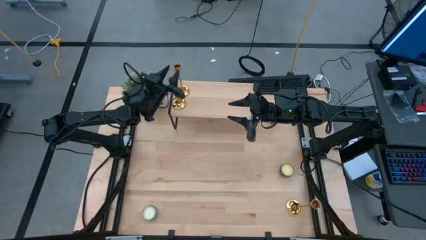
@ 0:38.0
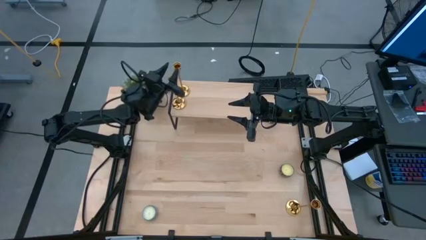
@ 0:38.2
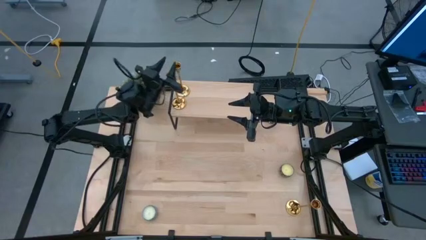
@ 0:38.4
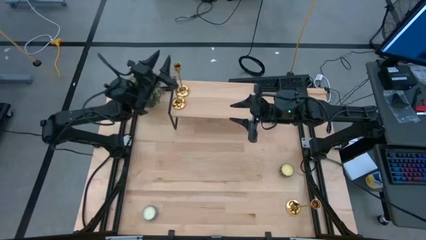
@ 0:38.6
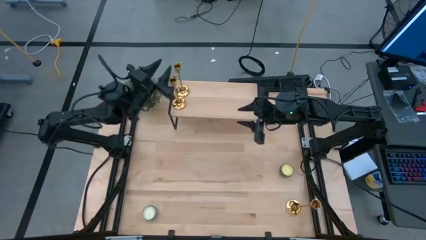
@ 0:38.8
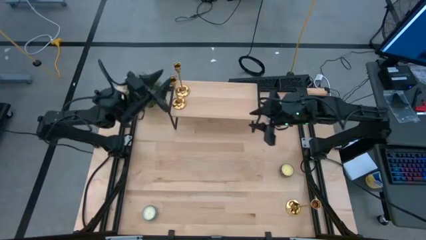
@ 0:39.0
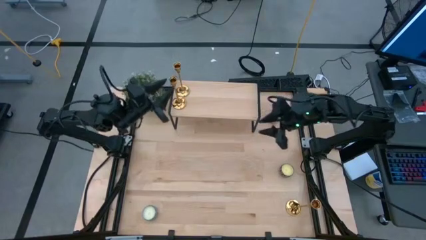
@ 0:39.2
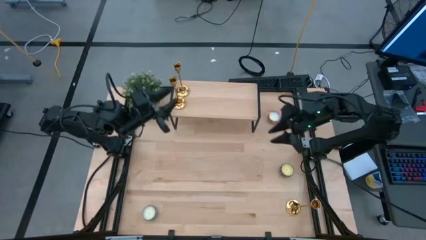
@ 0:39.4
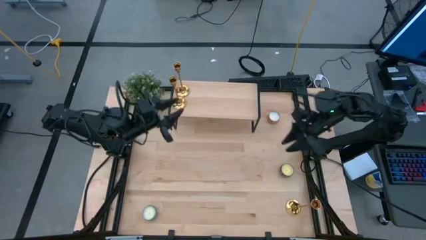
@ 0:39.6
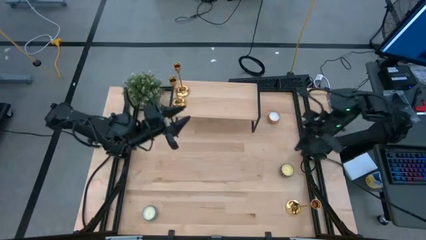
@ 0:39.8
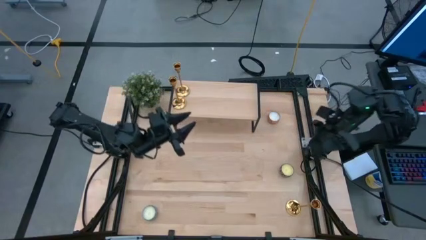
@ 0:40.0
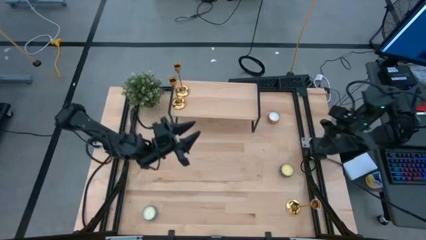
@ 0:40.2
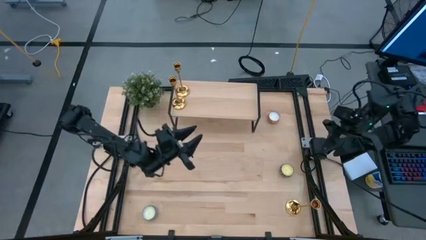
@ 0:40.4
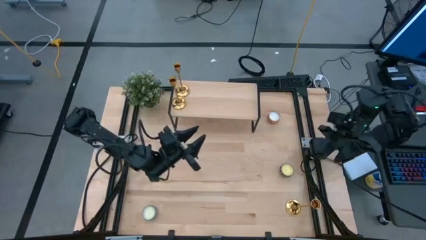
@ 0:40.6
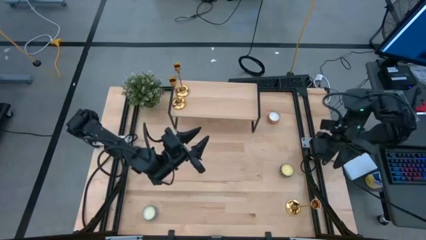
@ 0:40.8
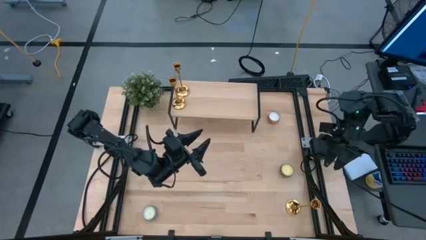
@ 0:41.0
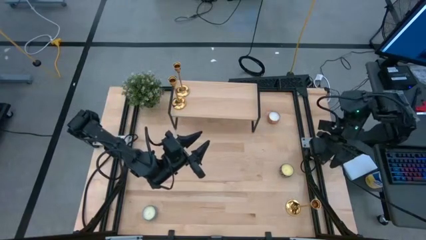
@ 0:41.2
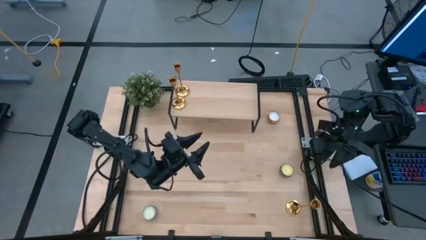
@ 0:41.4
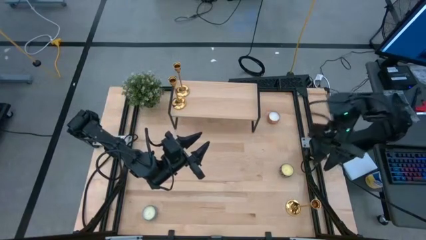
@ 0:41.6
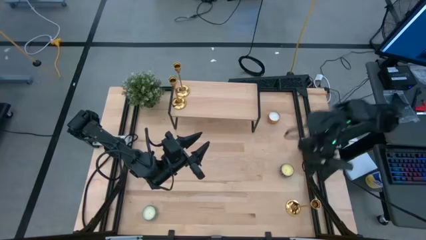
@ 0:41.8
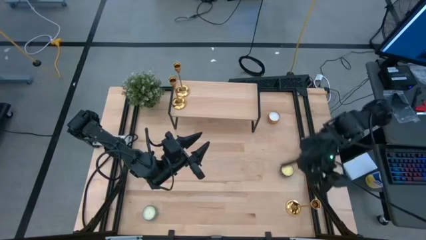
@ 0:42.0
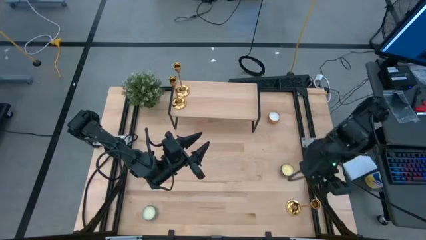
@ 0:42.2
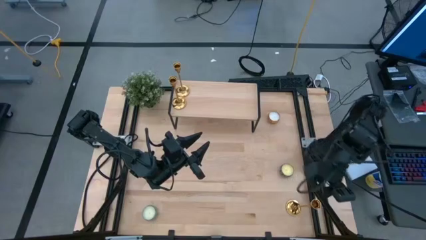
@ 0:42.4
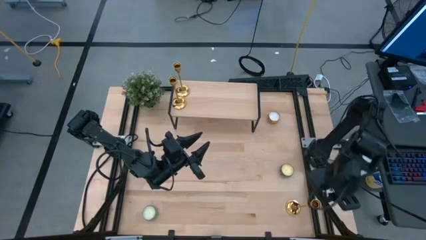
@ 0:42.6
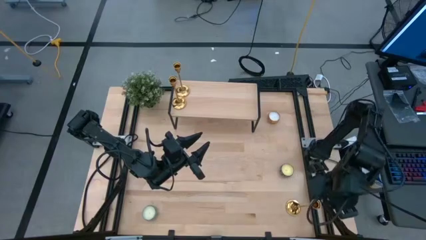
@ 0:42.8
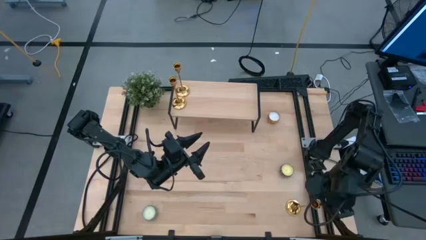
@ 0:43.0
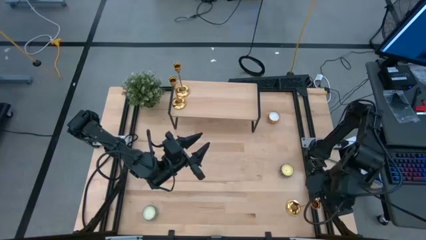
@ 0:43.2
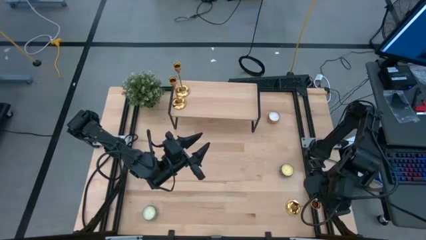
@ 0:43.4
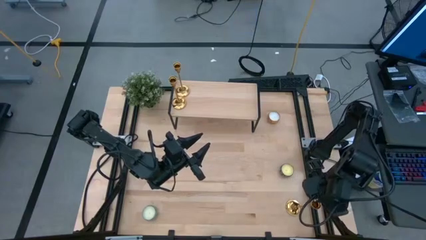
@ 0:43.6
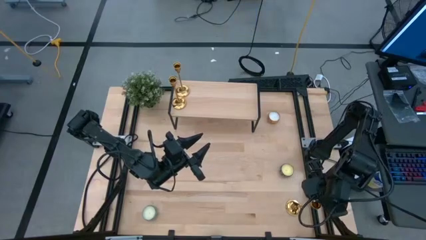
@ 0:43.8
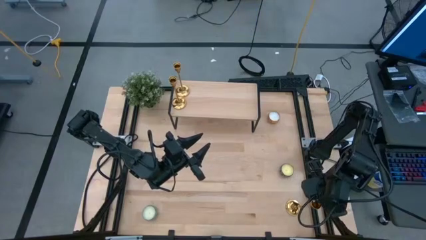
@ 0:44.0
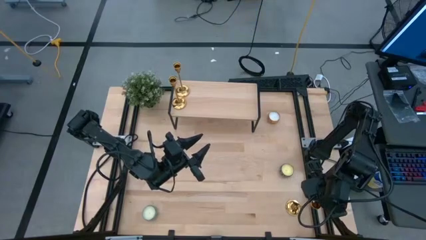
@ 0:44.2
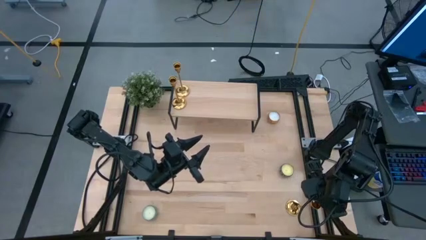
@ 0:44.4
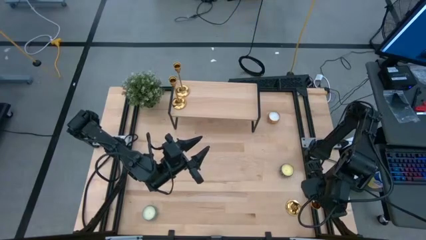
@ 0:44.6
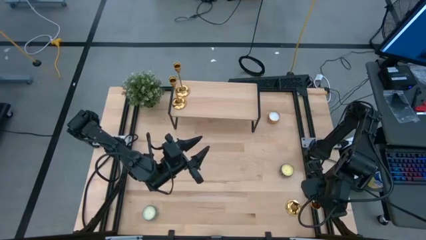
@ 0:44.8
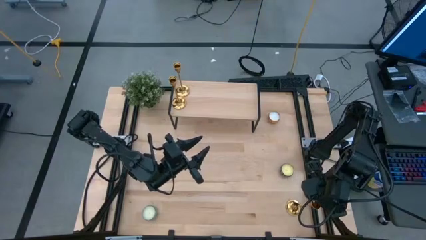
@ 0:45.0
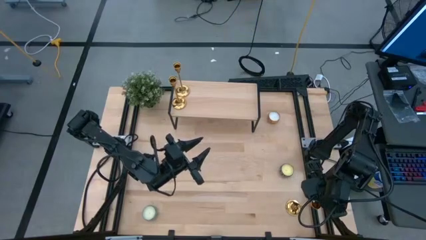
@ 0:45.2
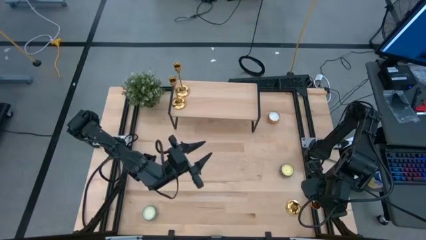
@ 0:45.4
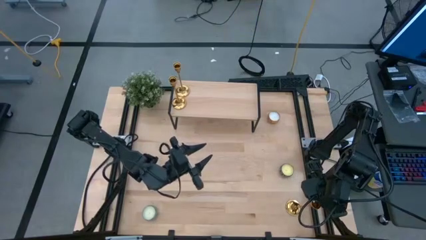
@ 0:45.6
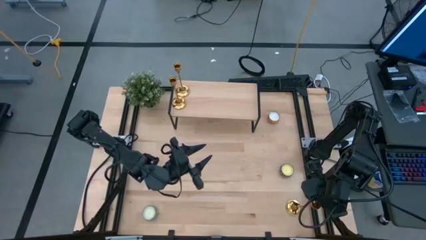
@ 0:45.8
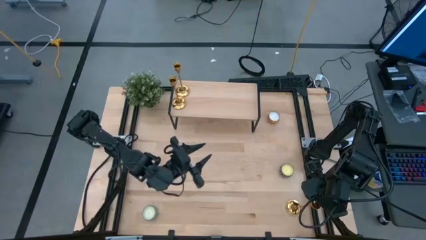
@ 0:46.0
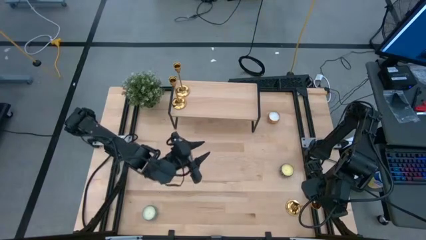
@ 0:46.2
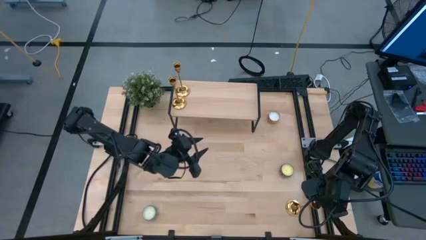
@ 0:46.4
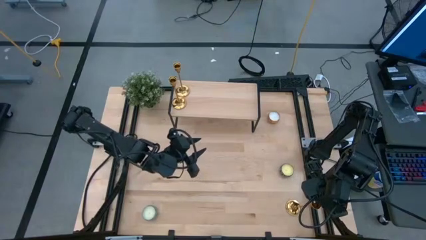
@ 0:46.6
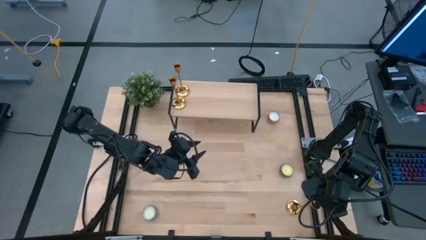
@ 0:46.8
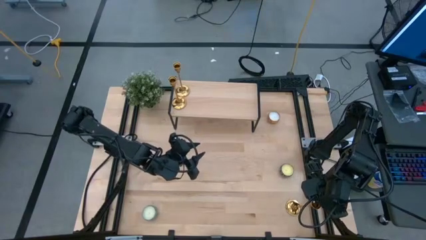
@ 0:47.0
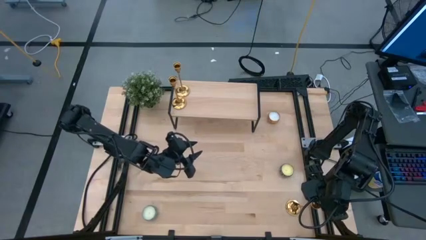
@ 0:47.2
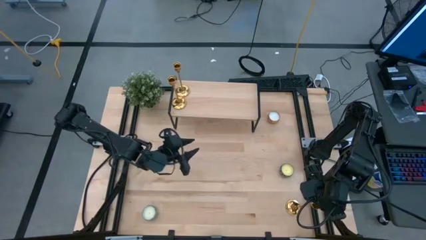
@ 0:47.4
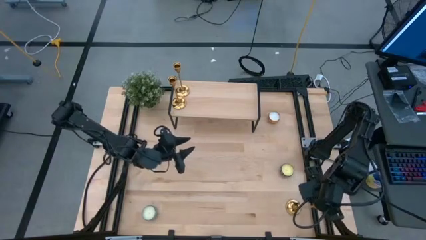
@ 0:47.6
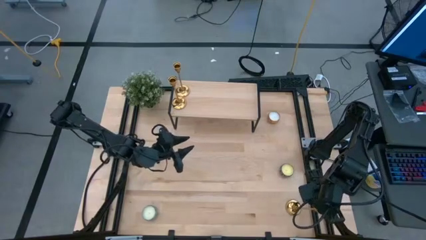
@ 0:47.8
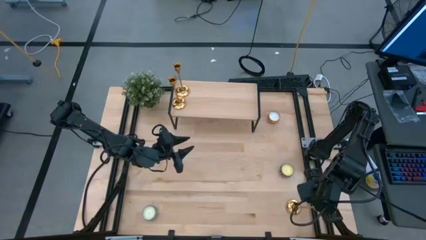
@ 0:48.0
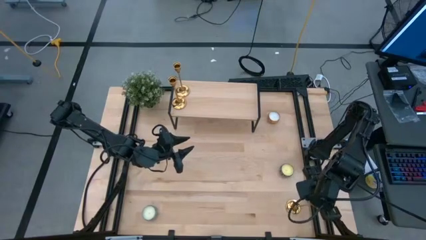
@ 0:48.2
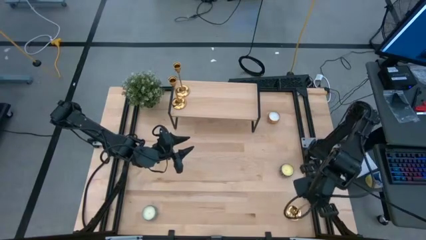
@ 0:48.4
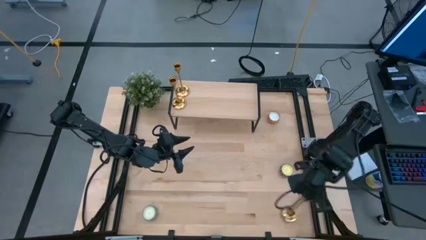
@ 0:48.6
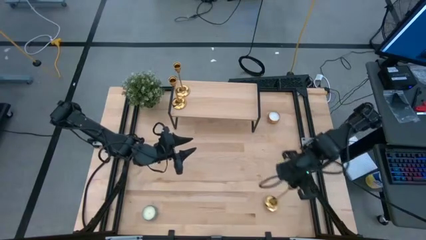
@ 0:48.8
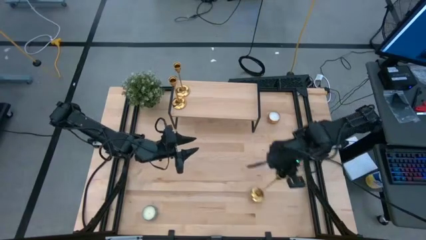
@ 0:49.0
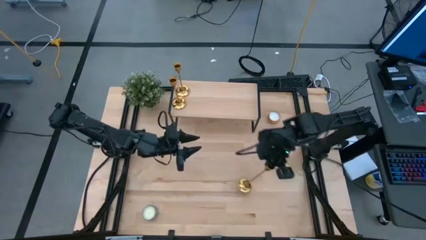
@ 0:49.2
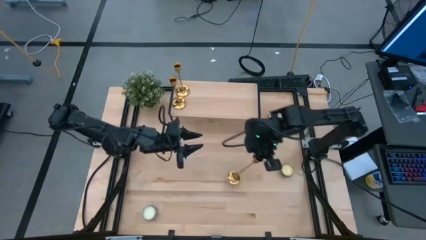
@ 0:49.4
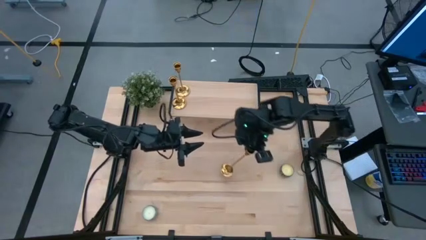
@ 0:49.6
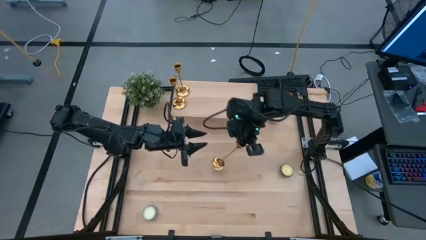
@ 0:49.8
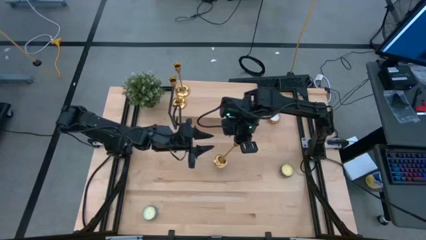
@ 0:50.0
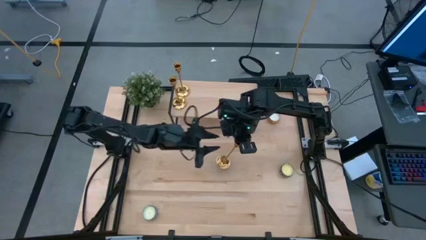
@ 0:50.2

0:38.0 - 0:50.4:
Task: Pick & Place candle stick holders
Put the gold candle holder on the shelf

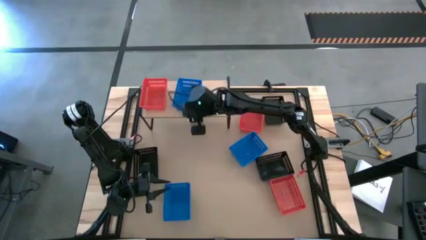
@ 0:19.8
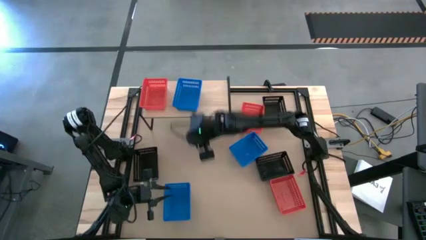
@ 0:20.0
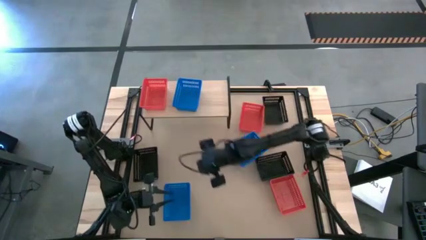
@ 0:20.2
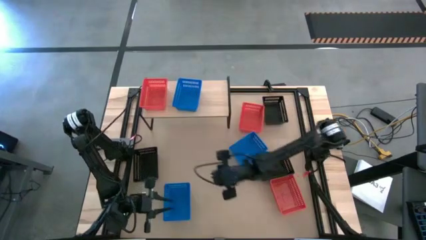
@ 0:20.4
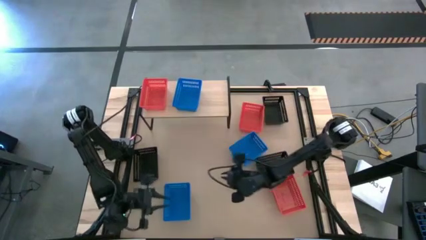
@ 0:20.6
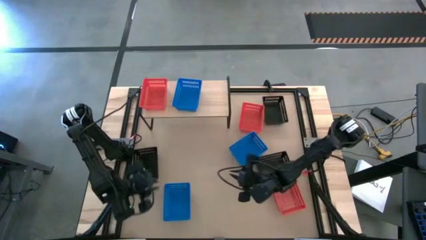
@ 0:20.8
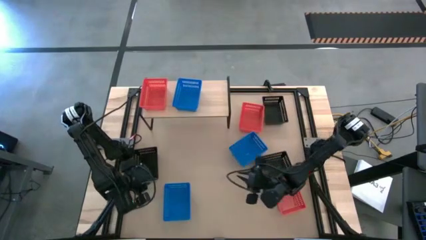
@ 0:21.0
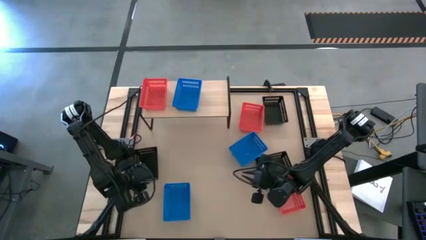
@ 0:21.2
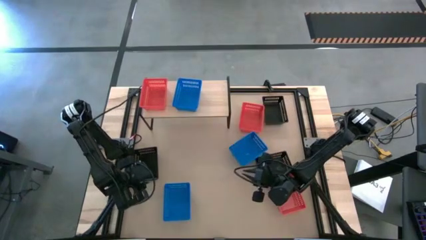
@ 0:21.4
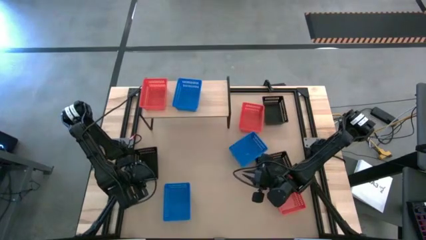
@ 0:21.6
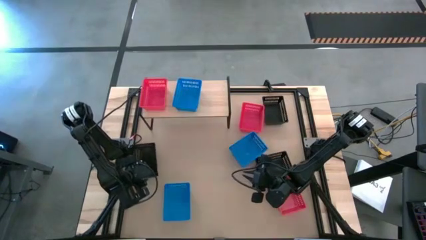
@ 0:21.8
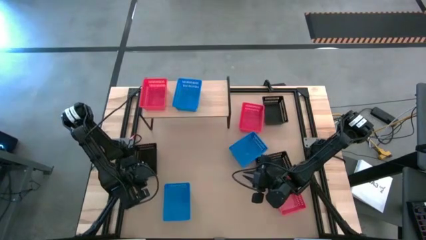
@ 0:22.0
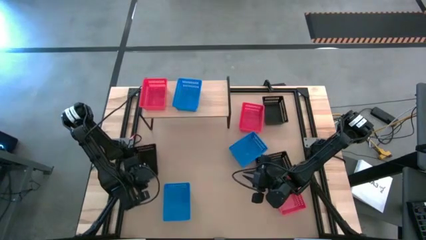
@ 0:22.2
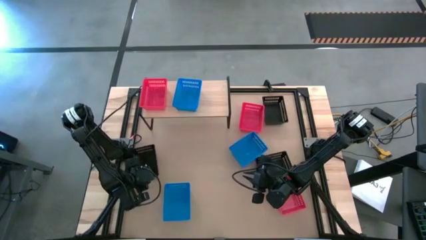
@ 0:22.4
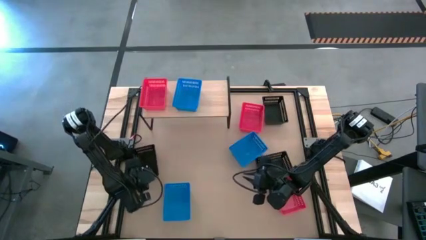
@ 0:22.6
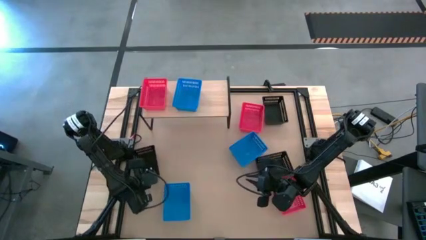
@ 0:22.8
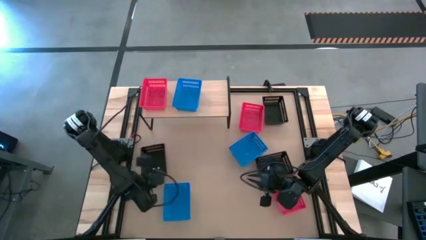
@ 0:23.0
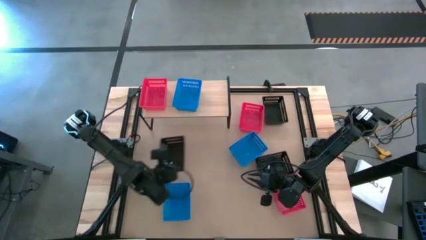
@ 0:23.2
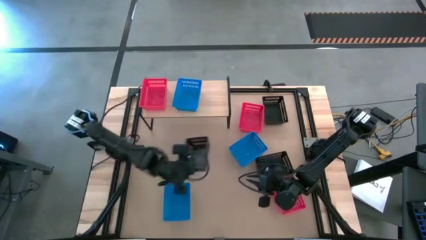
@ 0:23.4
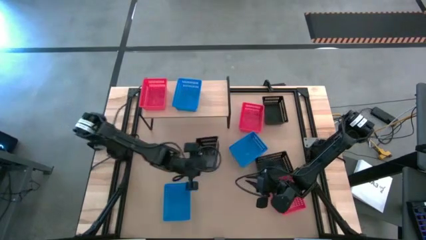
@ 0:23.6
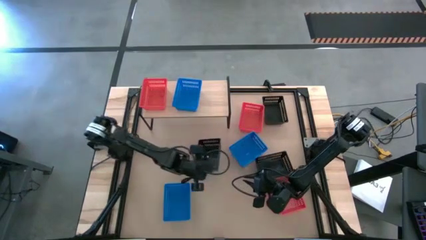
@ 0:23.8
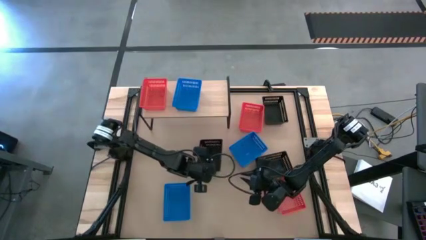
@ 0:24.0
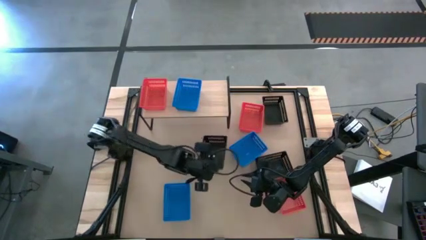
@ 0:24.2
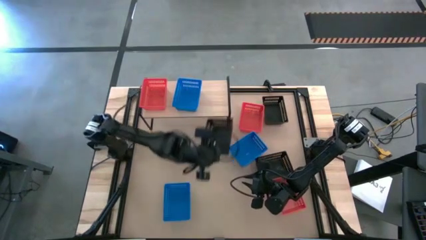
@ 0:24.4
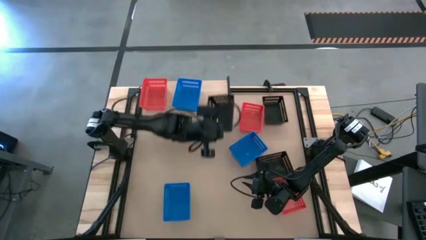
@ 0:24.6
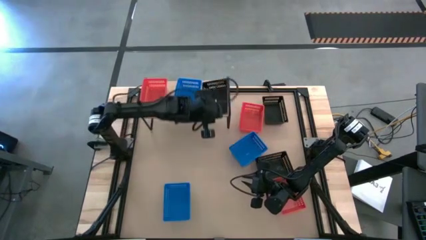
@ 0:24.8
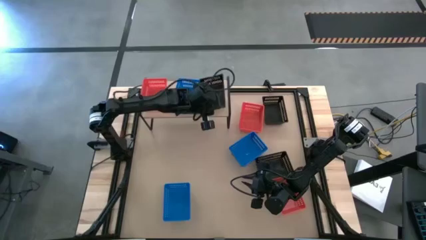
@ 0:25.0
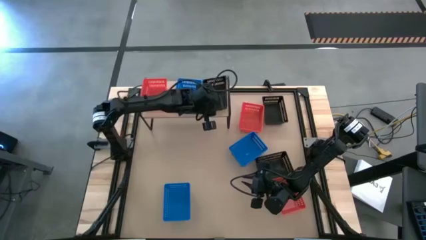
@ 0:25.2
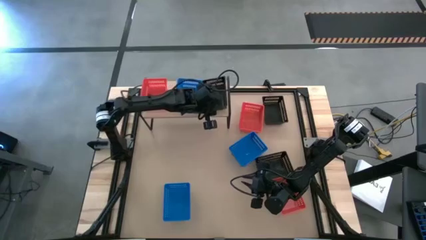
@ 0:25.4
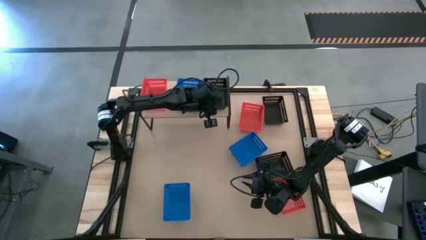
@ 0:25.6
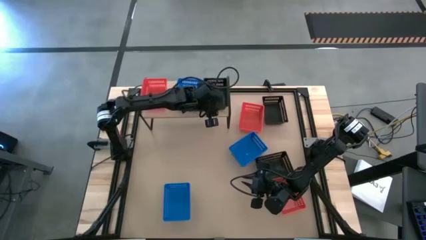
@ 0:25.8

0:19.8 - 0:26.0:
Task: Stack baskets on shelf by color
Put the left black bin on the shelf
